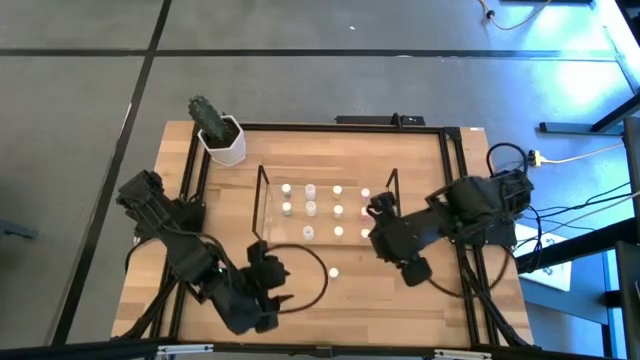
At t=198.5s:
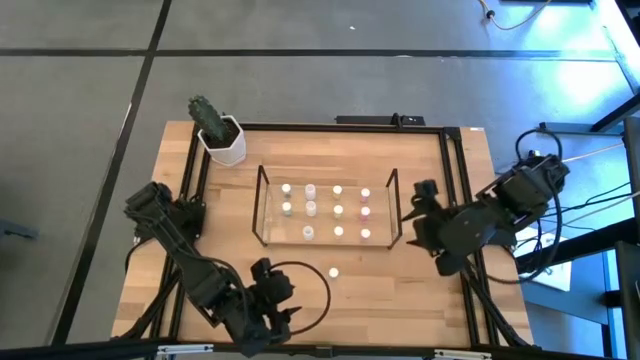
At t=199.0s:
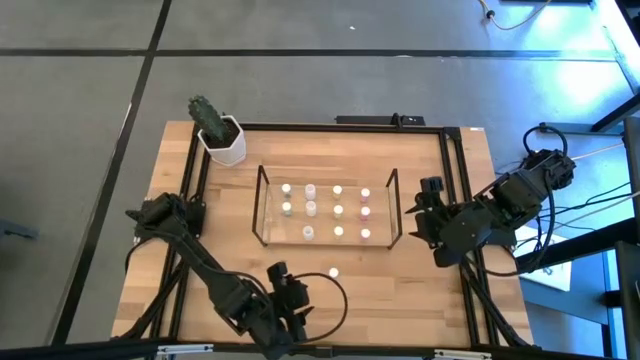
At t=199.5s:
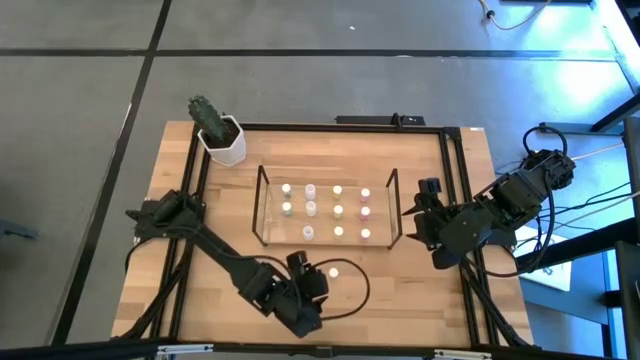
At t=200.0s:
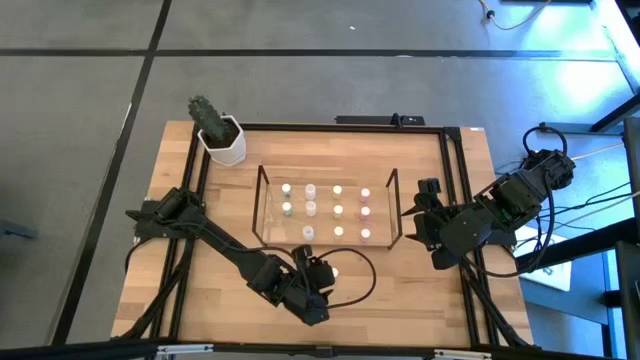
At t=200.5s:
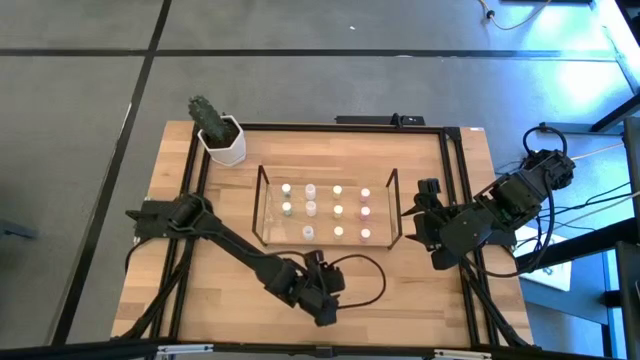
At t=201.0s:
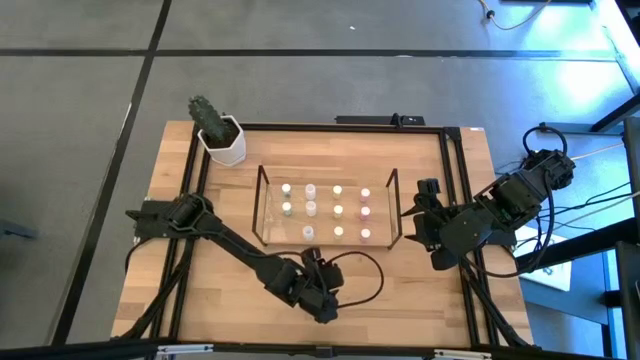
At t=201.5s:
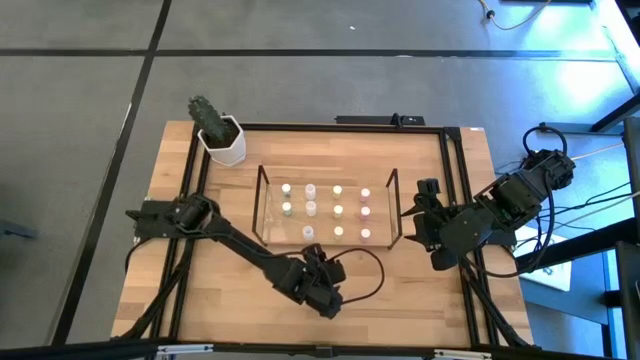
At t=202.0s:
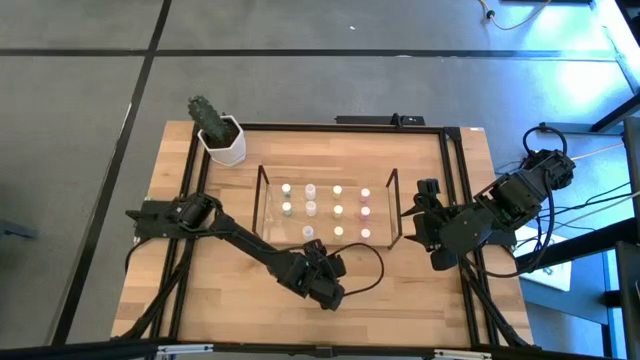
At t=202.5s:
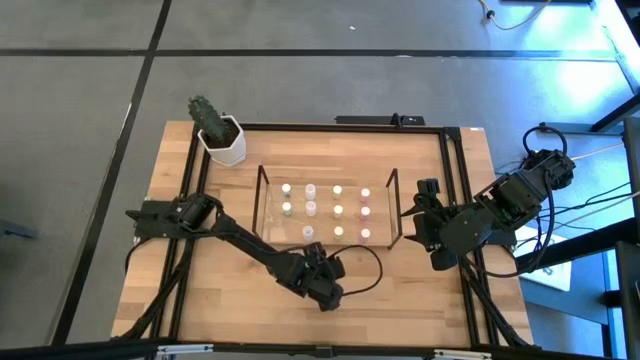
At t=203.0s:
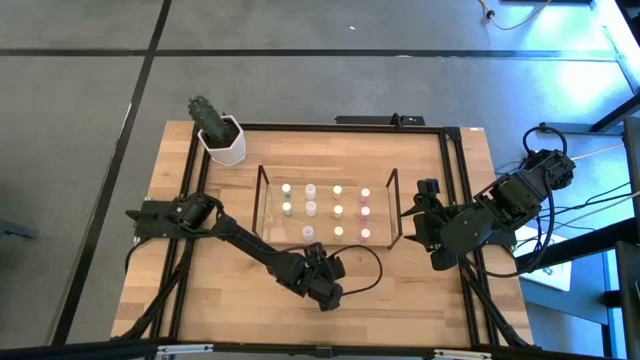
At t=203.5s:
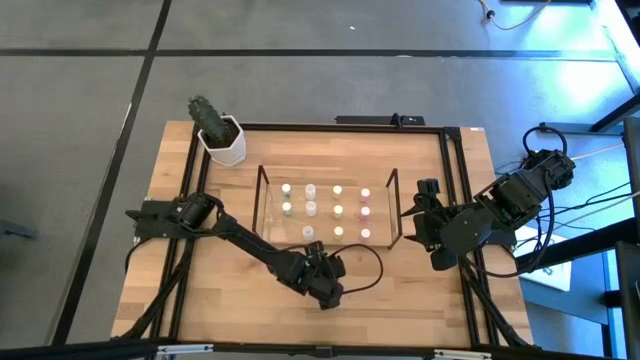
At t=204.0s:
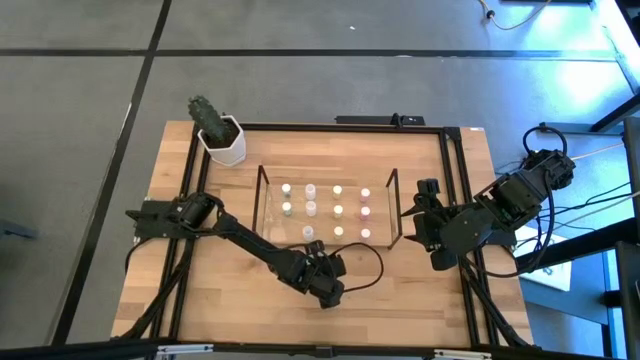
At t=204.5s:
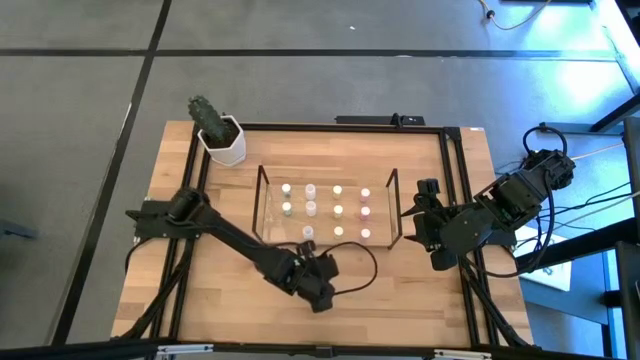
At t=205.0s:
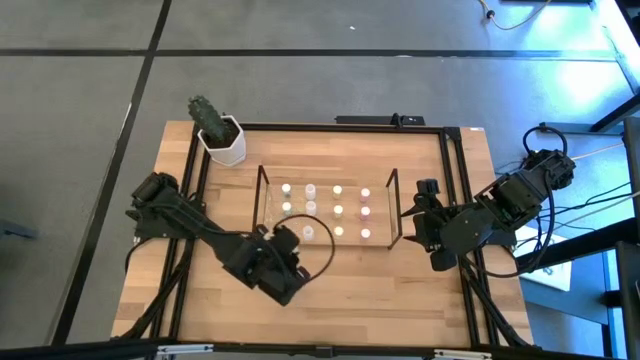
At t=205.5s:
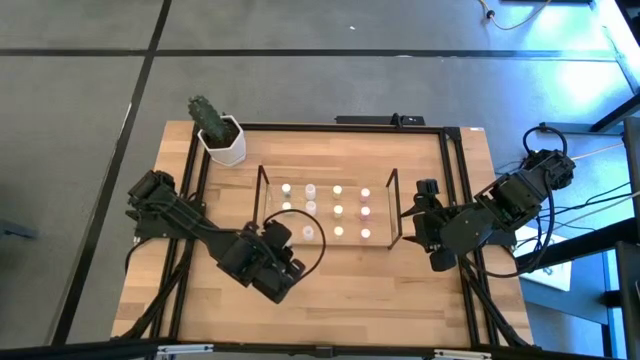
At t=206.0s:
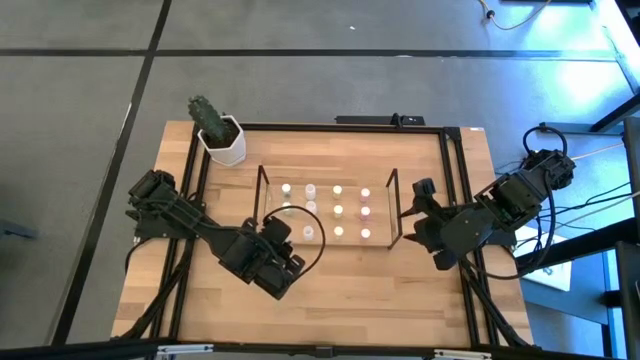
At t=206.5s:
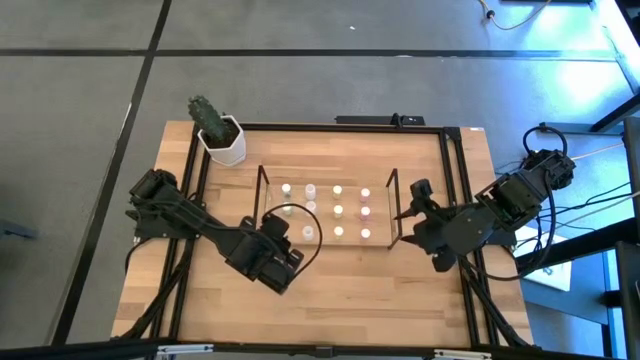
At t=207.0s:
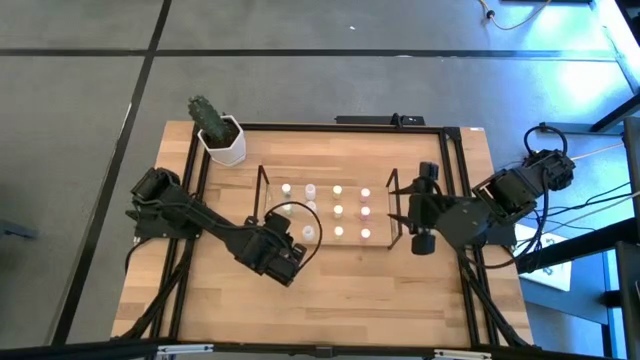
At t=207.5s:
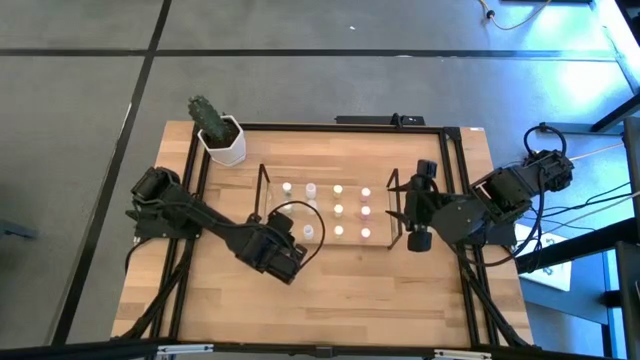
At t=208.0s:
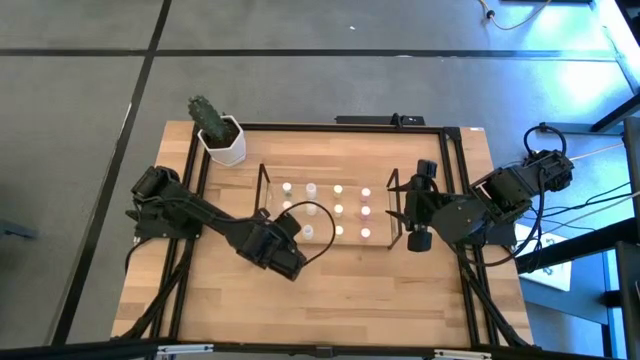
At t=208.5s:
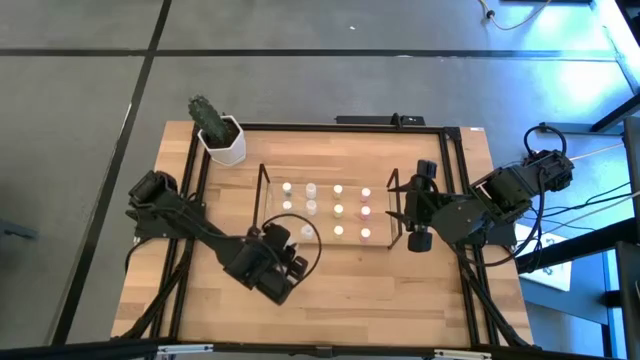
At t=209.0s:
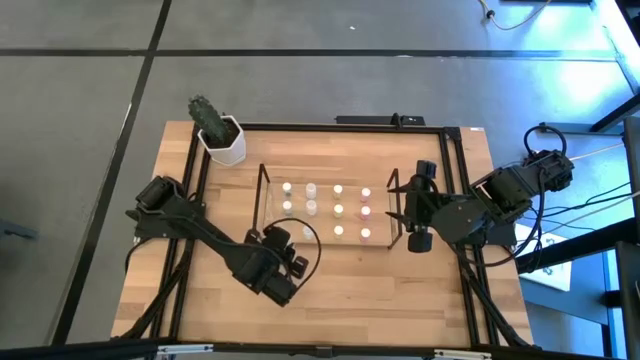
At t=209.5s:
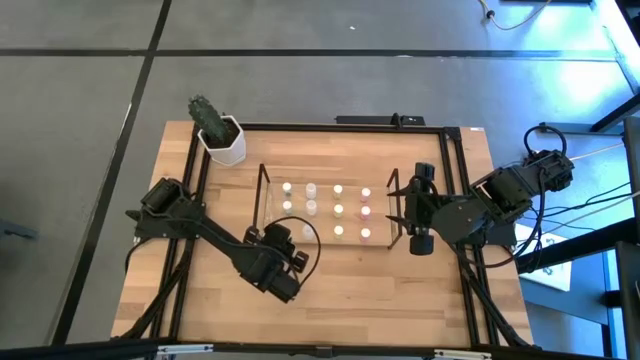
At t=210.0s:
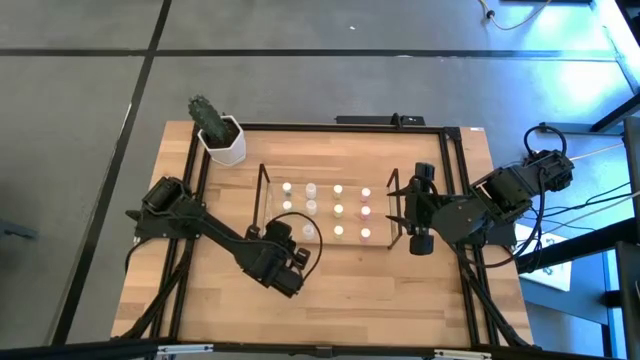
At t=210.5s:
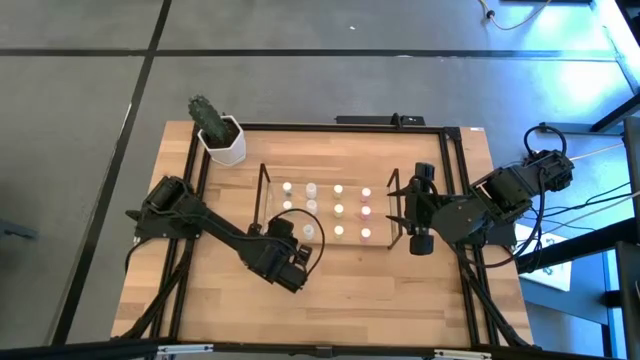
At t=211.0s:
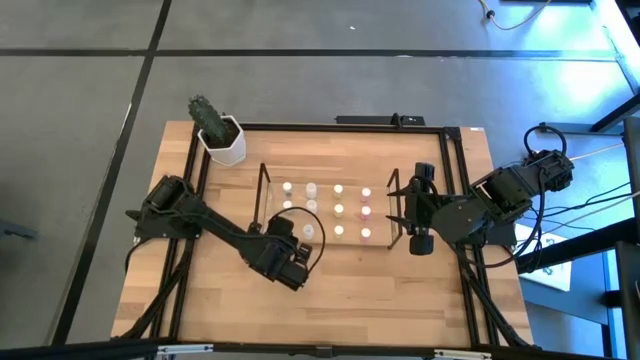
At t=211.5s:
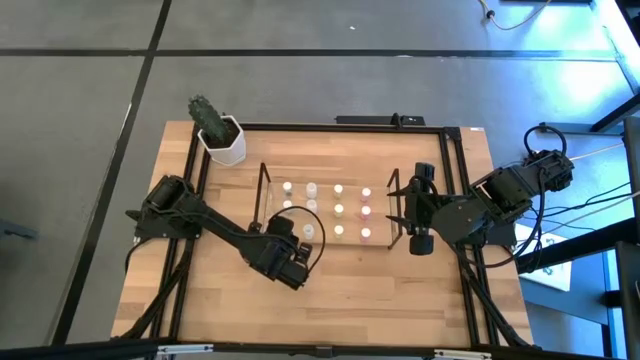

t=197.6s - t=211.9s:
Task: Pick and place medicine bottles onto shelf by color
Put the blue pill bottle aligned with the other blue pill bottles on the shelf

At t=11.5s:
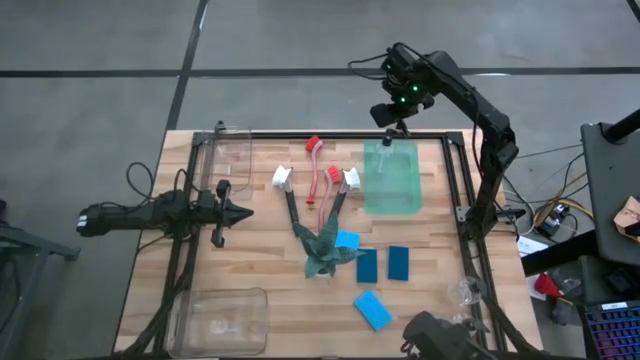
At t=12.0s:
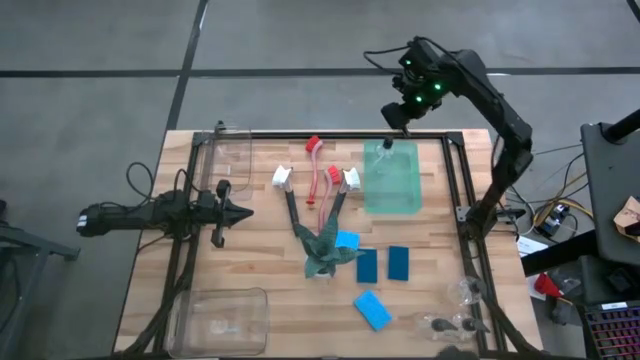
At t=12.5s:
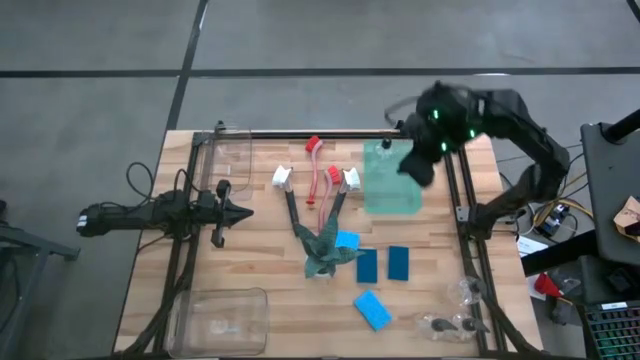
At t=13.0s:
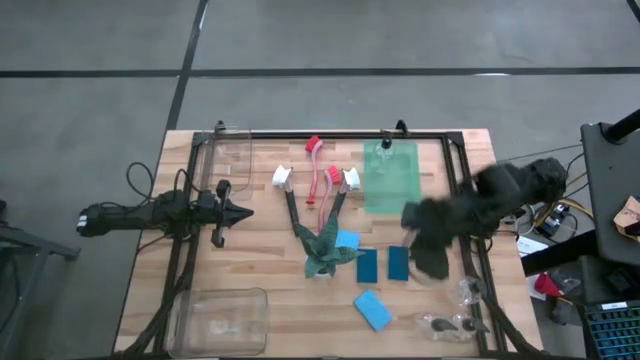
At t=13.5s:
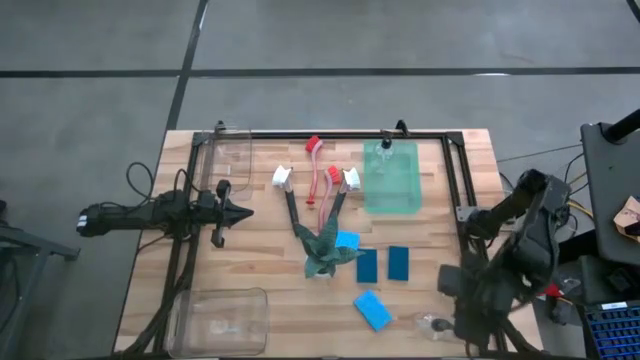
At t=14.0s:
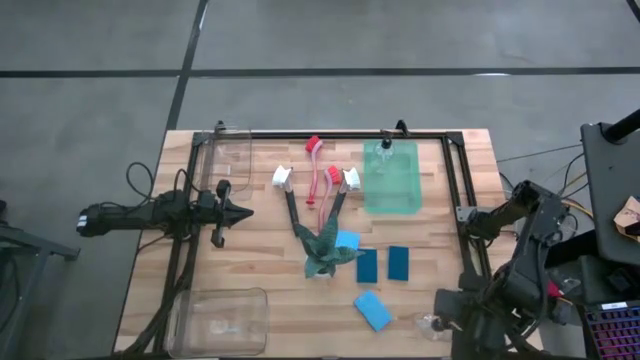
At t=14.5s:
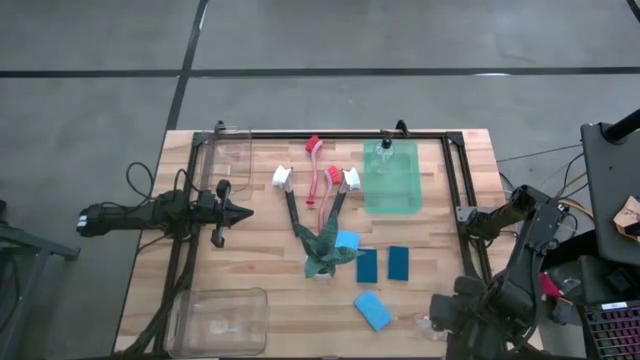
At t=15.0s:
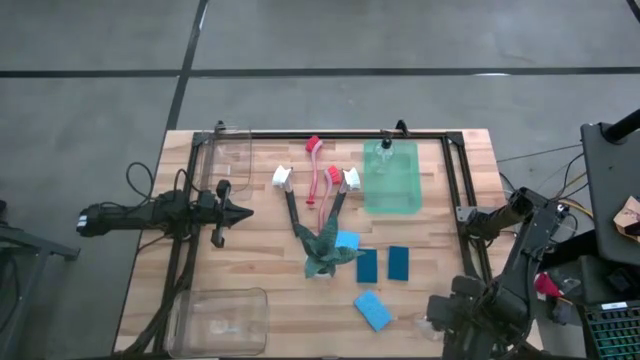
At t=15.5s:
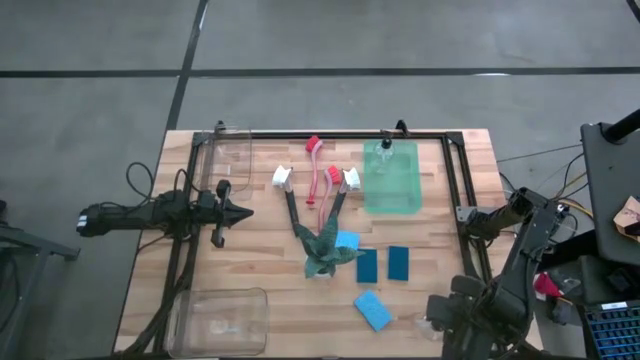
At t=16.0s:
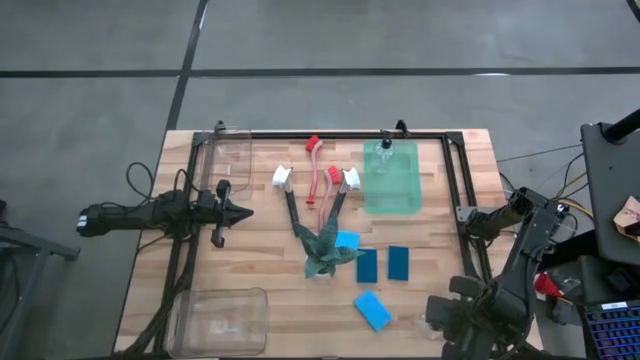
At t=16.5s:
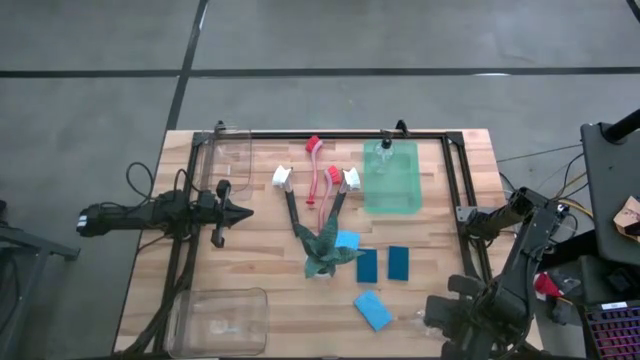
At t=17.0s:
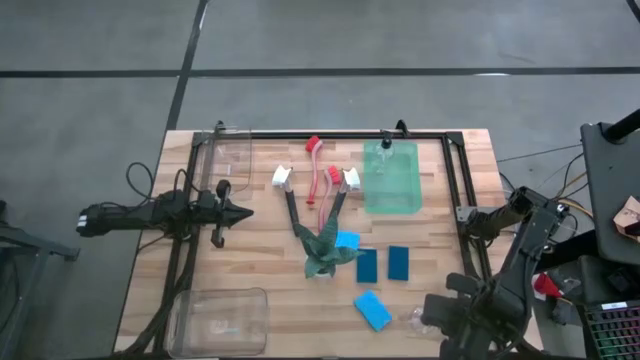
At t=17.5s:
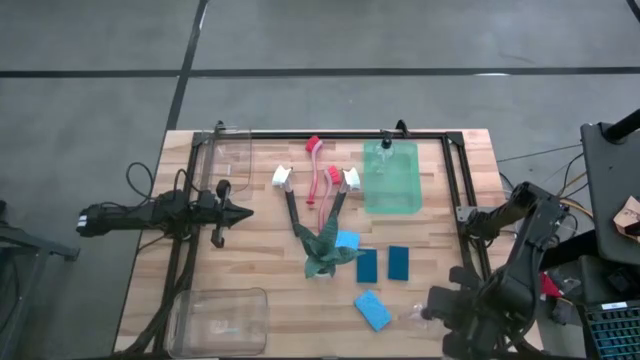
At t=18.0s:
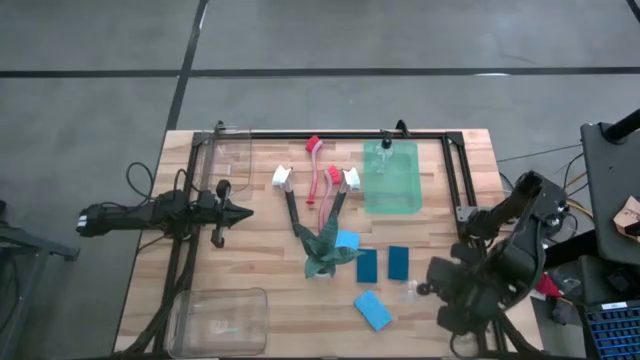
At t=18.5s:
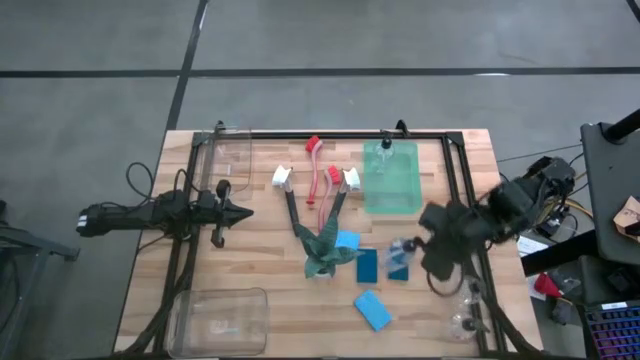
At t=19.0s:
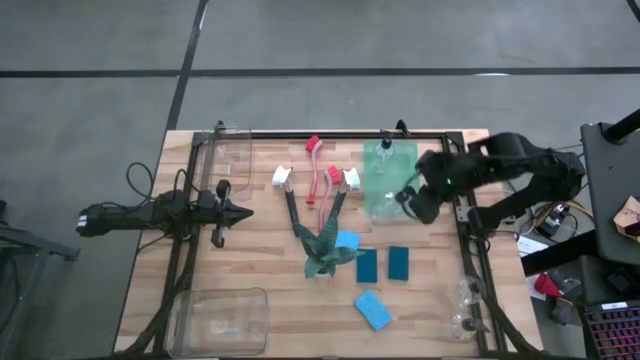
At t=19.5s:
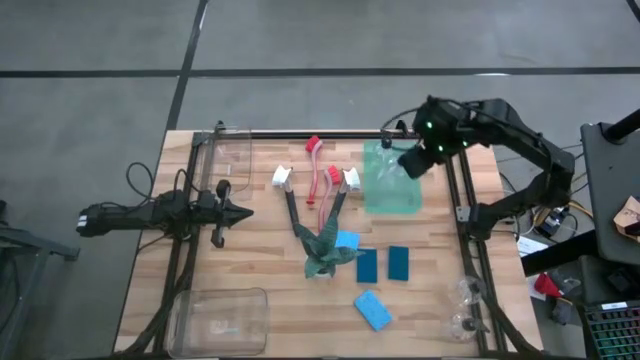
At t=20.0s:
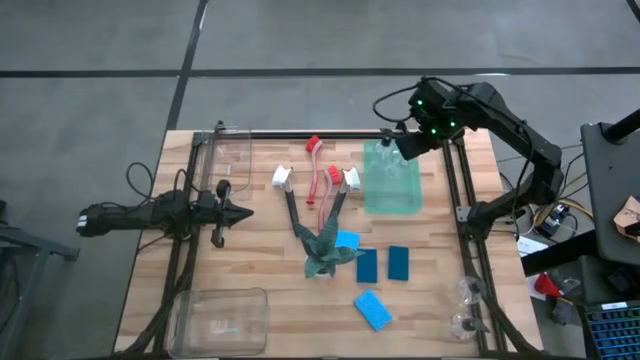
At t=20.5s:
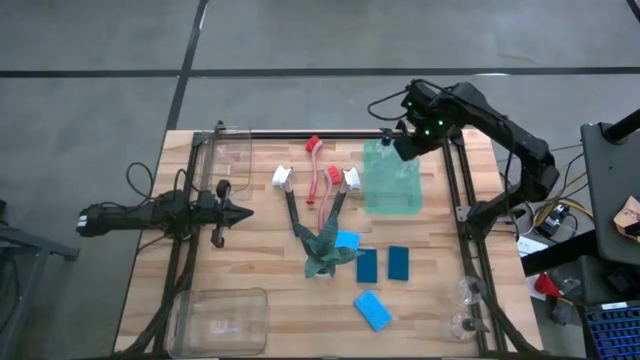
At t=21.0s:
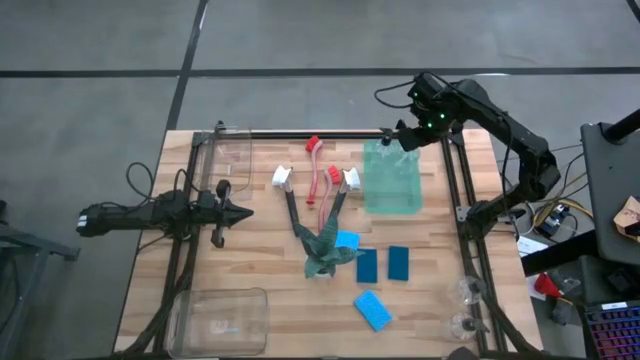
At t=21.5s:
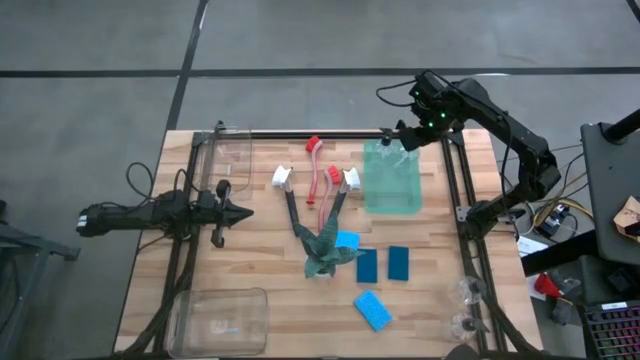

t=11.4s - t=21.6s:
Task: Pick & Place Kitchen Sink Supplies
Put the soap dispenser into the green bin
